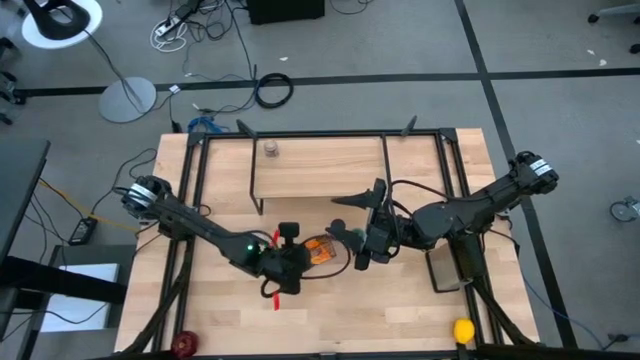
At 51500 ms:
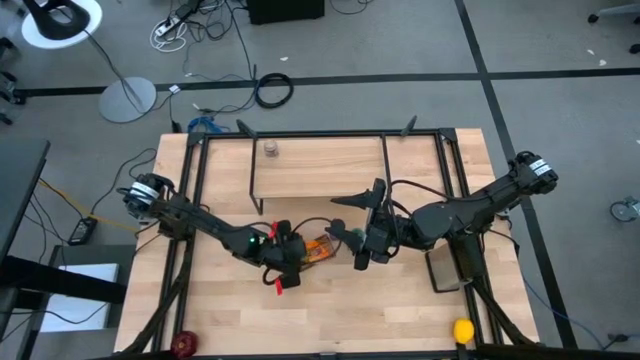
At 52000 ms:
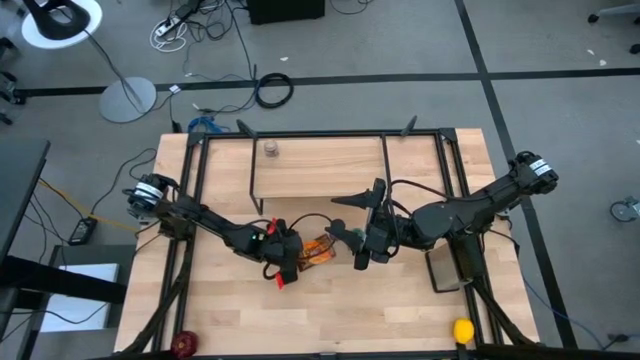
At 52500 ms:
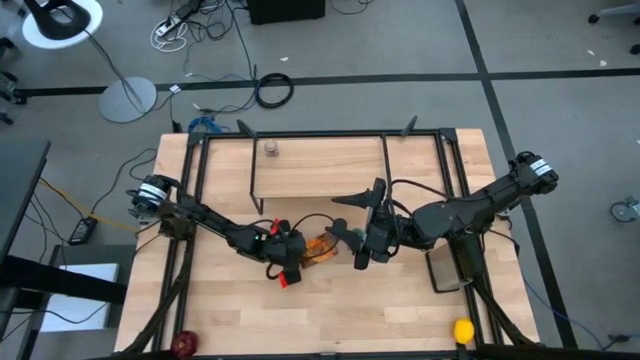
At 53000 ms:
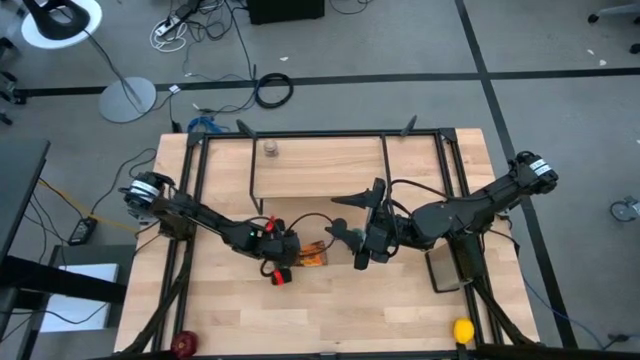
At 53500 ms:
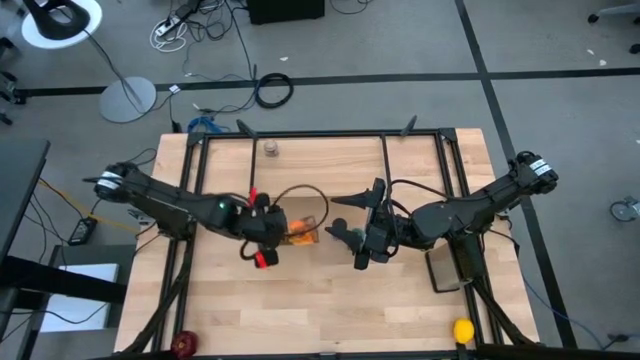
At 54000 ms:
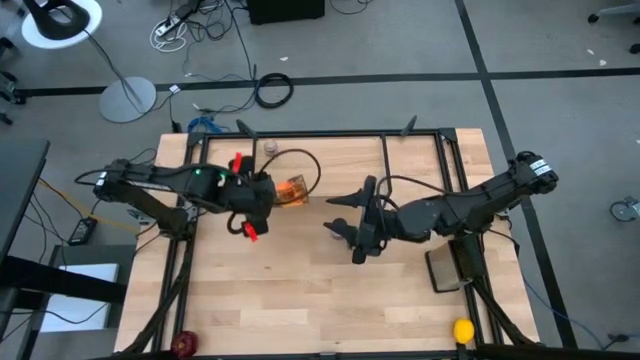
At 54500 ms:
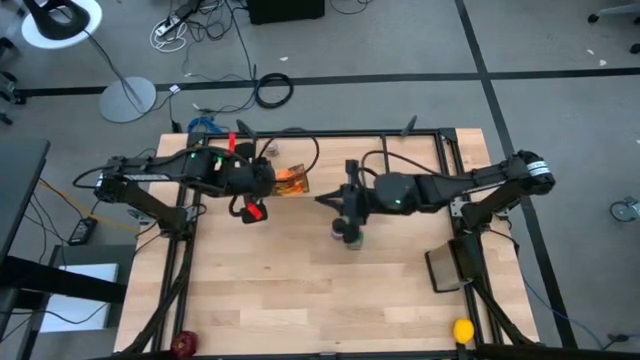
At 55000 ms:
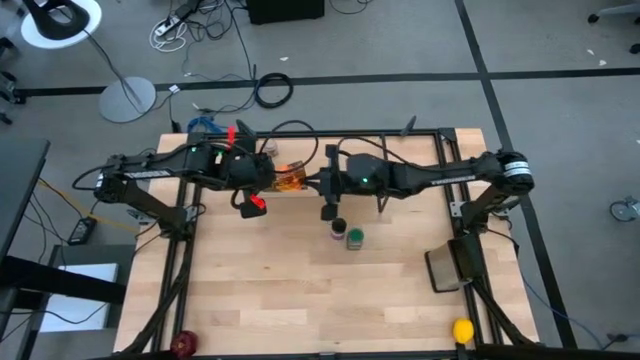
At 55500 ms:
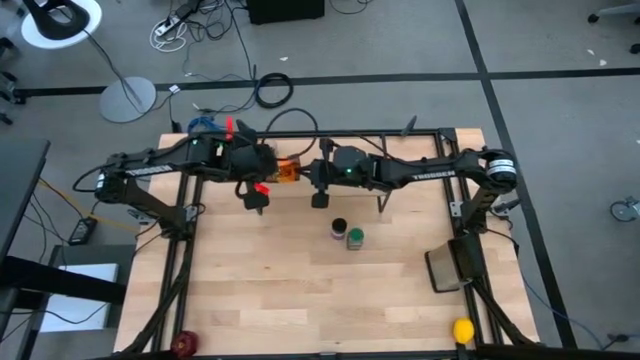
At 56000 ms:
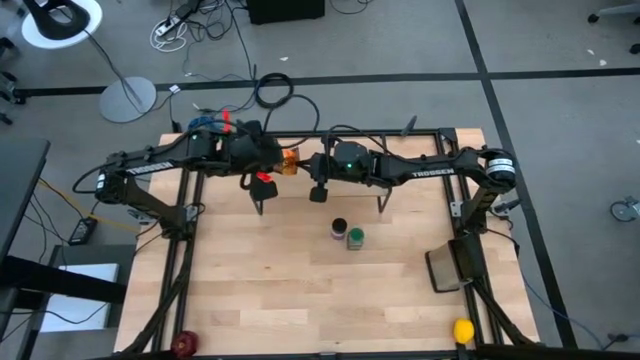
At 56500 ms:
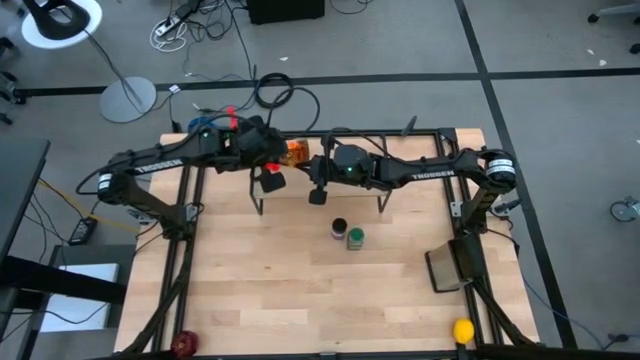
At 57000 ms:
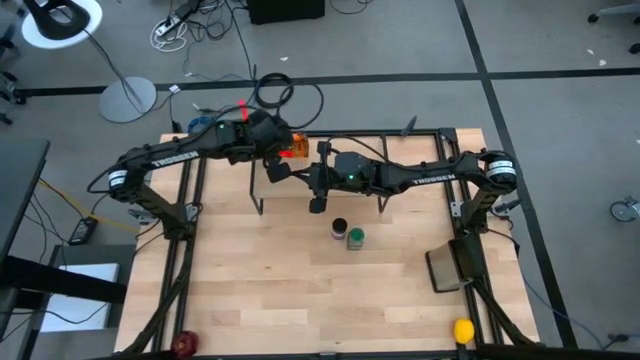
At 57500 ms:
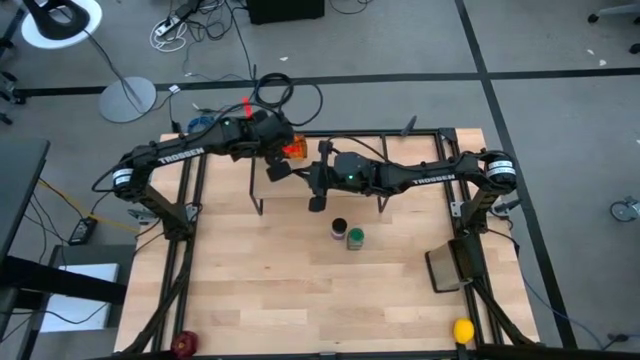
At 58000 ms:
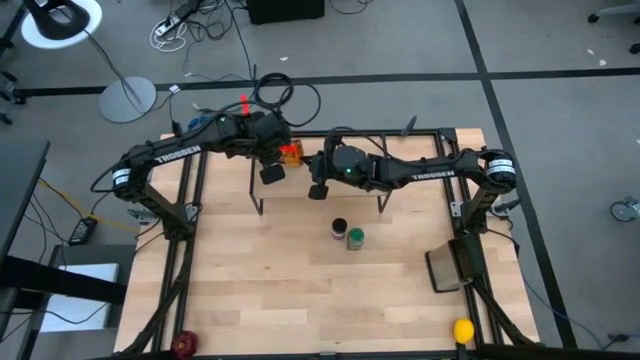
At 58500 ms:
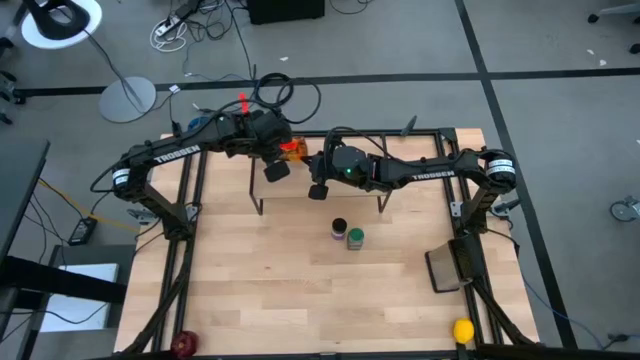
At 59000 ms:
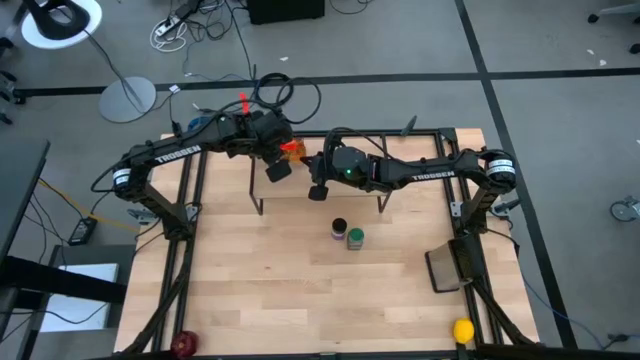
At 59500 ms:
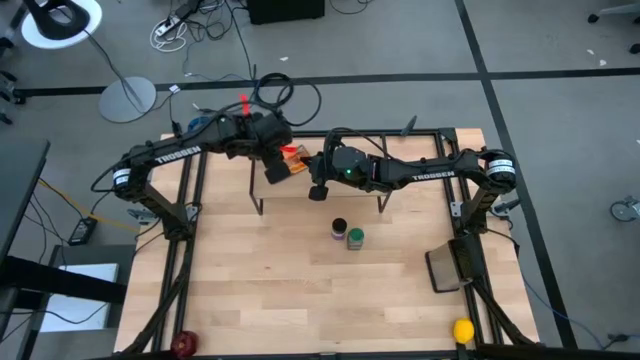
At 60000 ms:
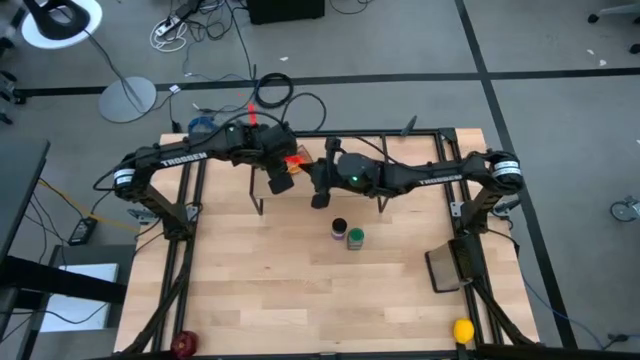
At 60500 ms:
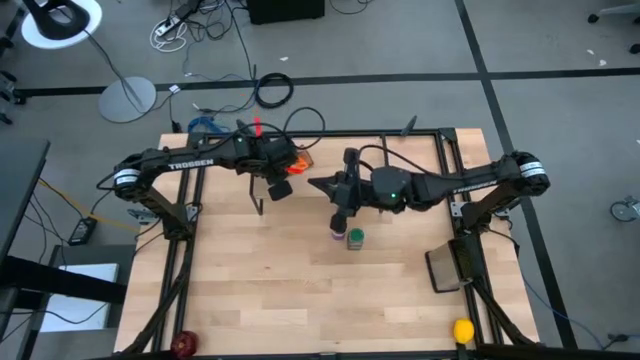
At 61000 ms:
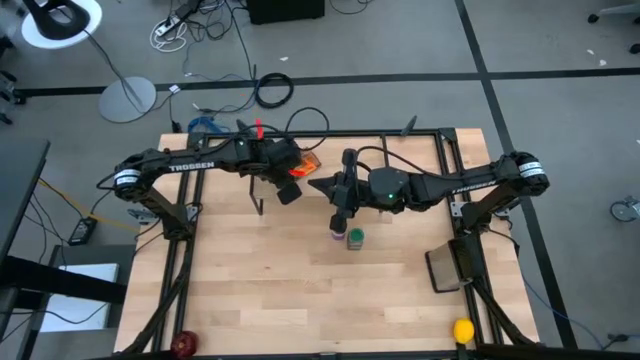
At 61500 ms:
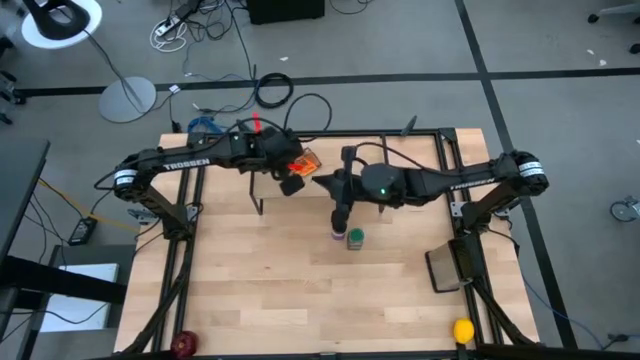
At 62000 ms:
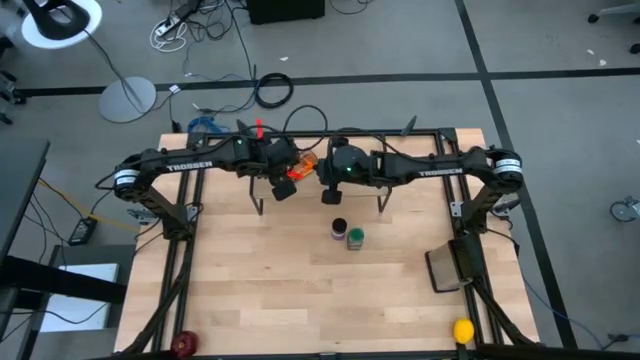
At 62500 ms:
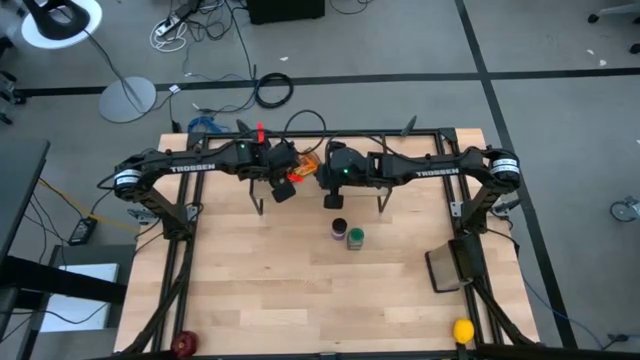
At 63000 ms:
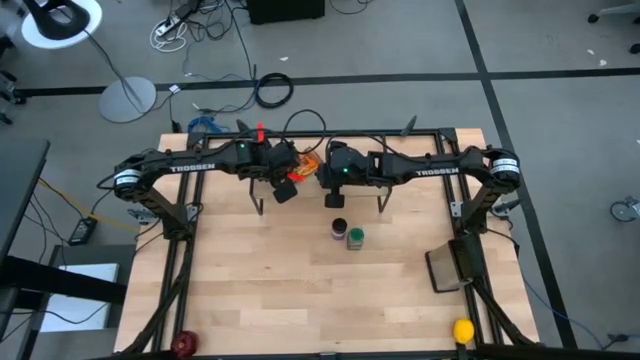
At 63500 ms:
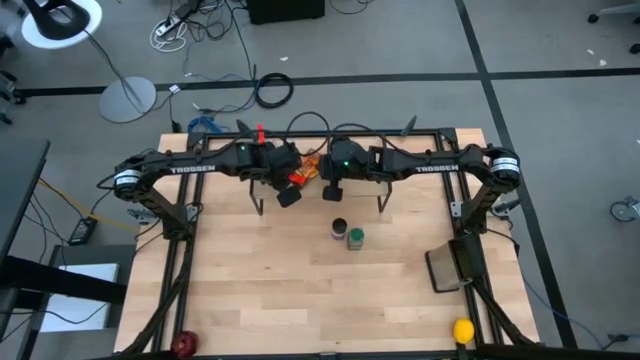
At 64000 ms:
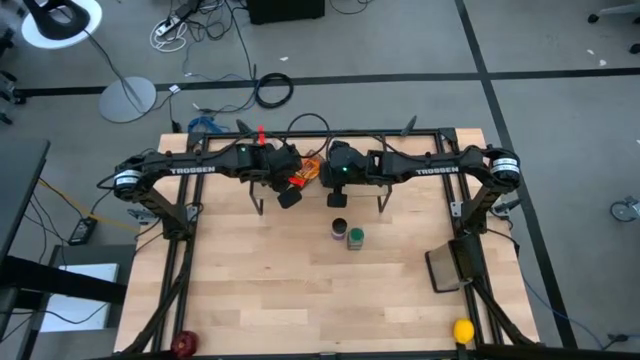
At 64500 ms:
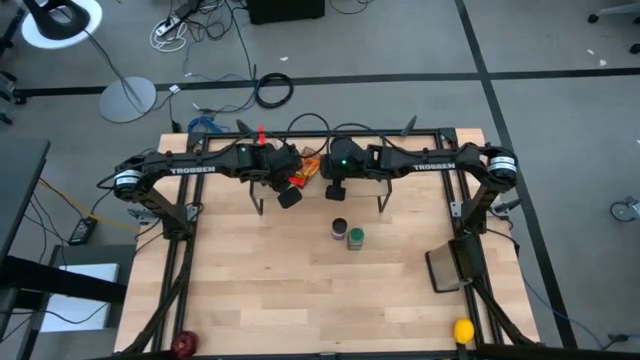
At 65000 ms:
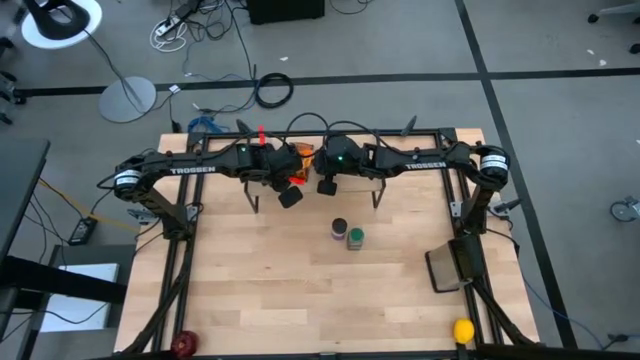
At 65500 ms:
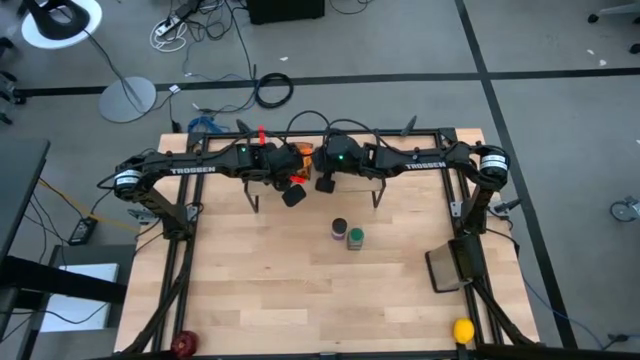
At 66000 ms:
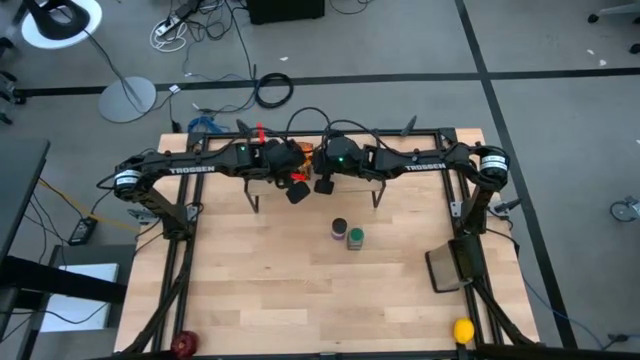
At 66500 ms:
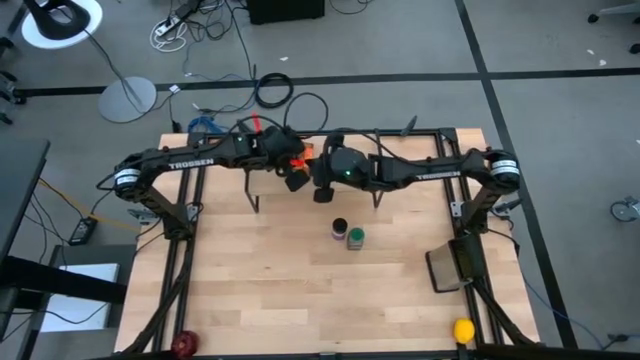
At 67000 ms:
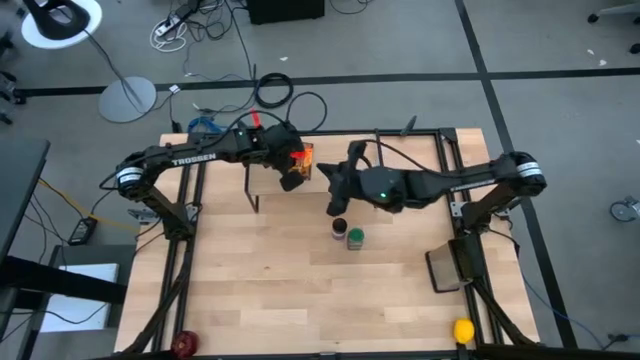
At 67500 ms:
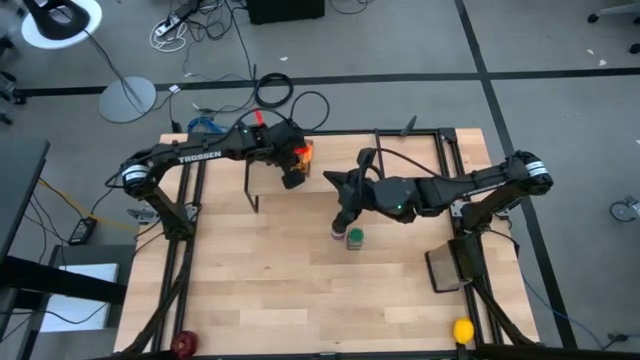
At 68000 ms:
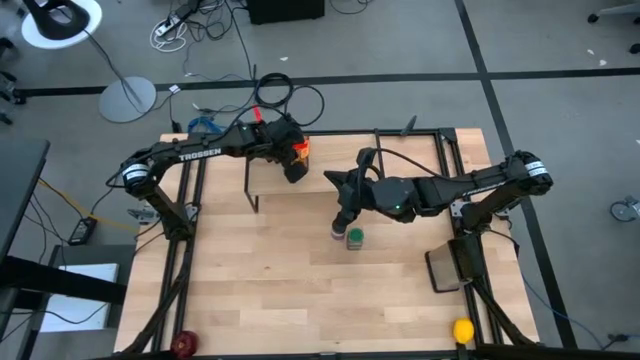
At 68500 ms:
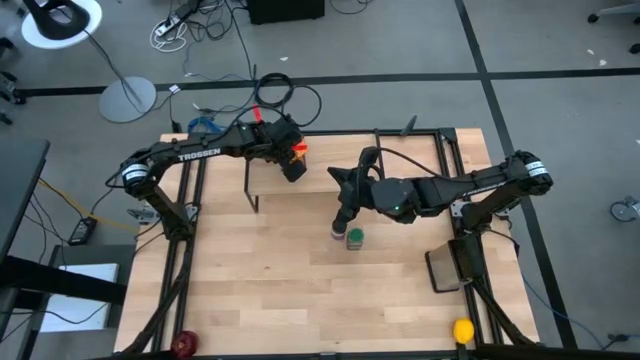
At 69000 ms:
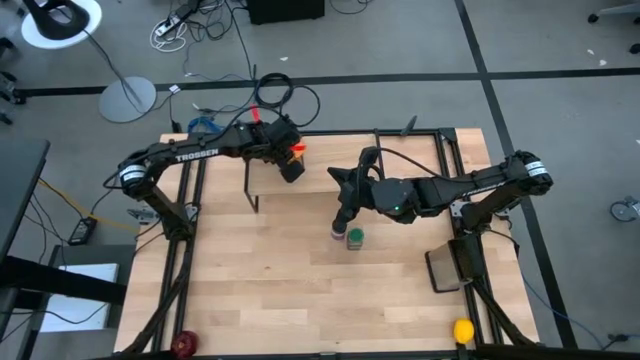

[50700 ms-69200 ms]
Task: Shelf spices
Put the brown seasoning pack on the shelf

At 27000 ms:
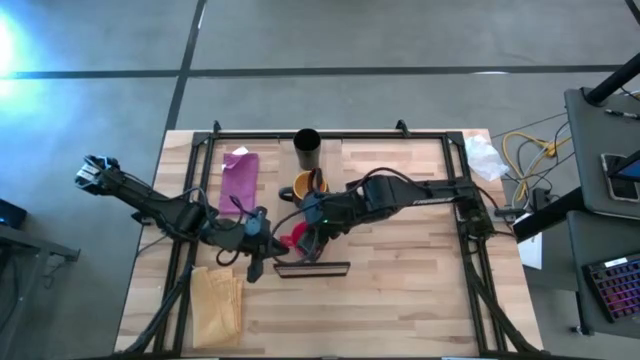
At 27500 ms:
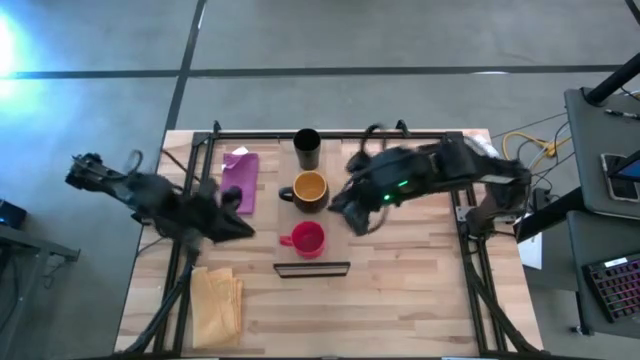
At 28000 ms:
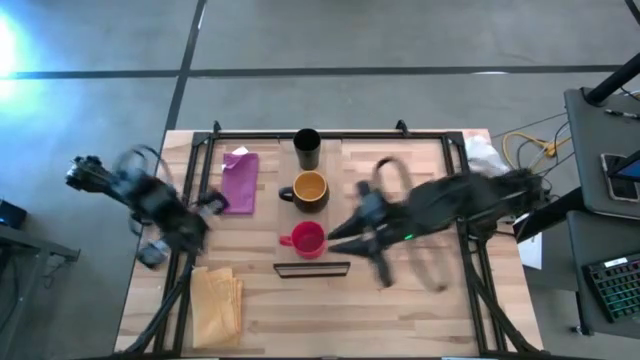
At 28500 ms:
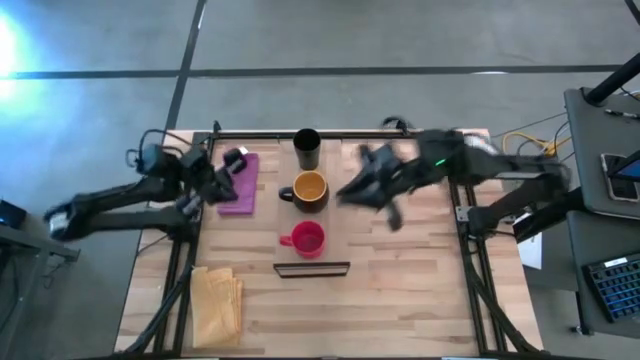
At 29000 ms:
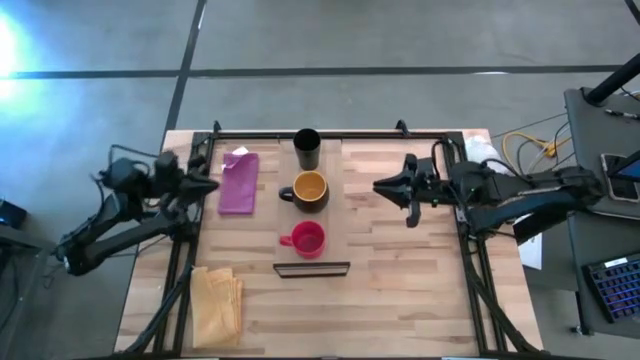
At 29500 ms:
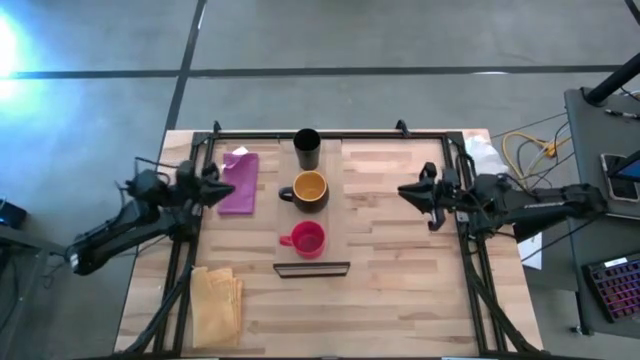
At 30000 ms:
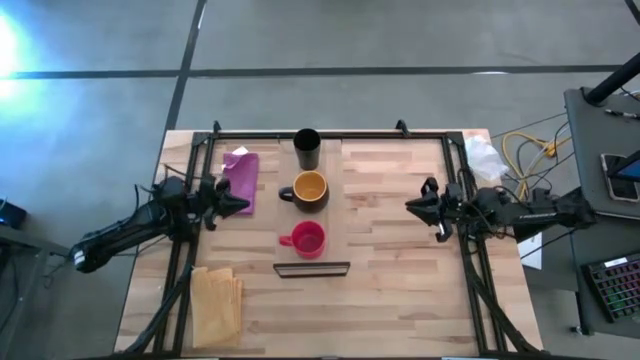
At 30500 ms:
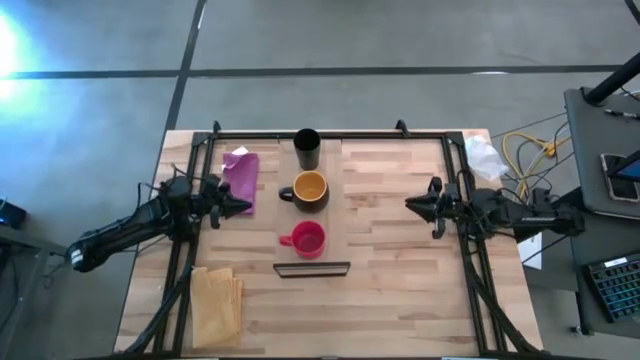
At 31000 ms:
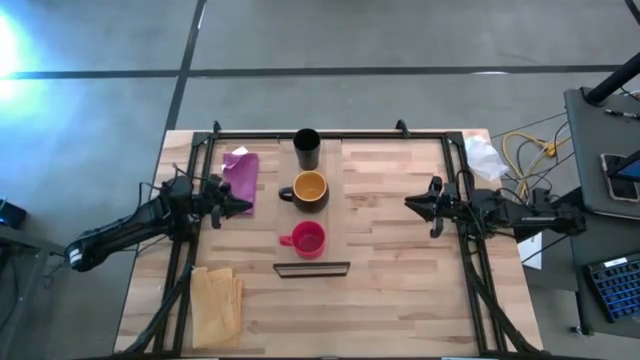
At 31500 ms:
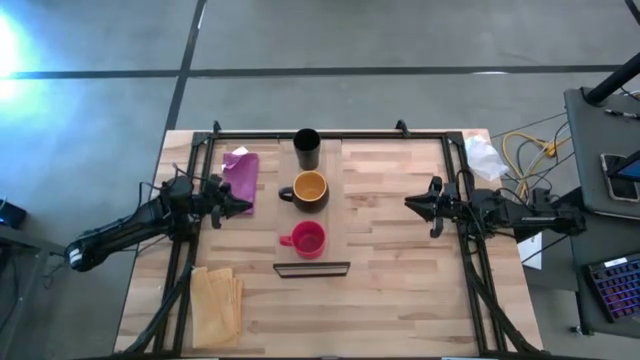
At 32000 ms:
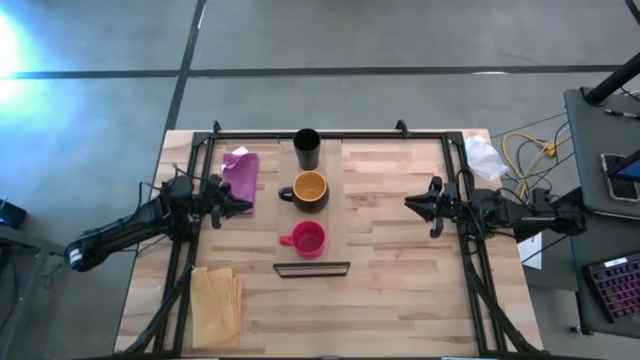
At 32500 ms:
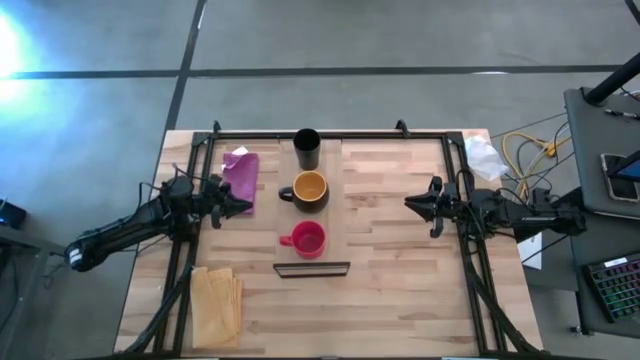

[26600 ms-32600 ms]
Task: Stack small to large cups/mugs on shelf
Return to Home Position
